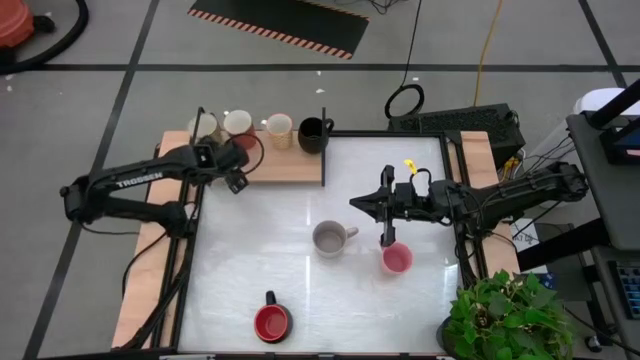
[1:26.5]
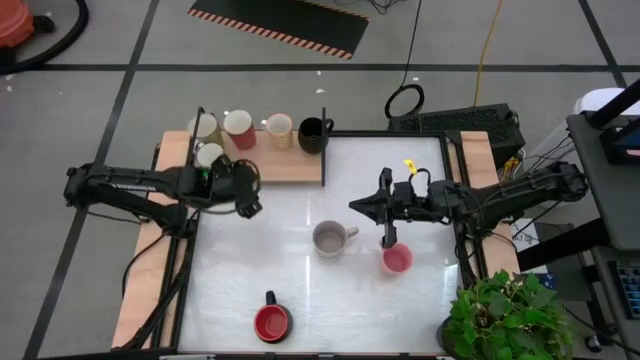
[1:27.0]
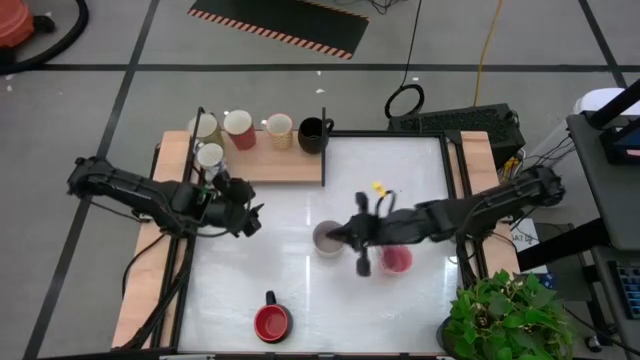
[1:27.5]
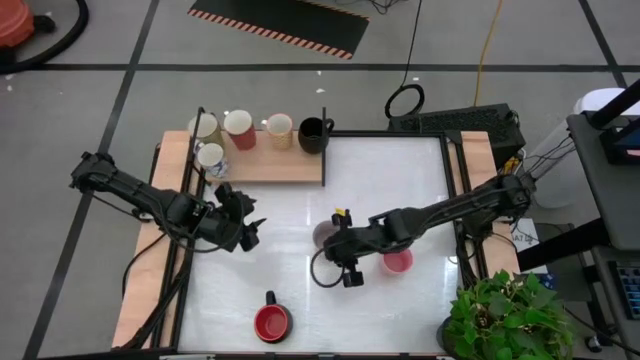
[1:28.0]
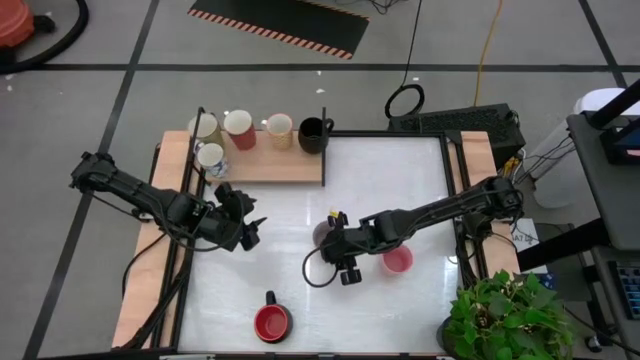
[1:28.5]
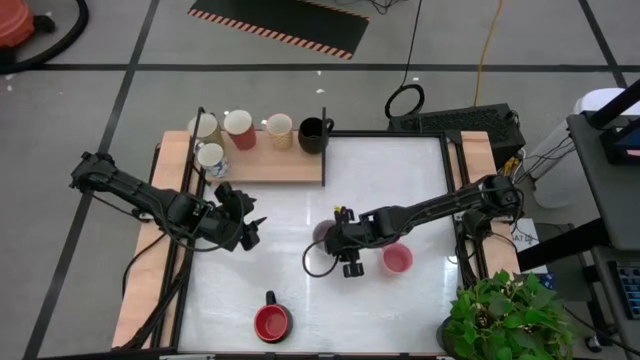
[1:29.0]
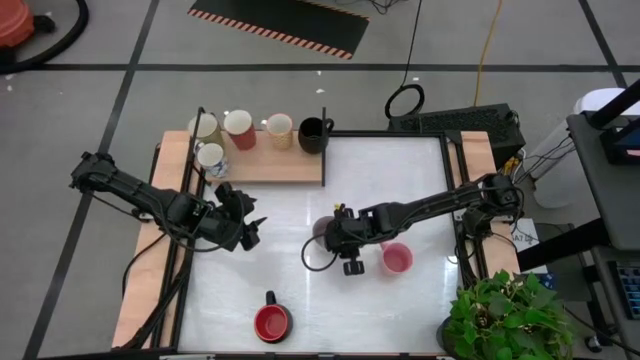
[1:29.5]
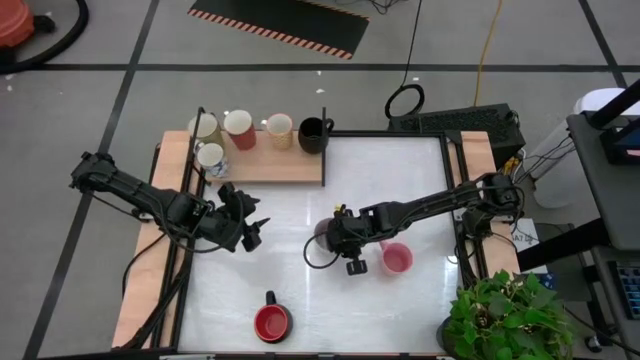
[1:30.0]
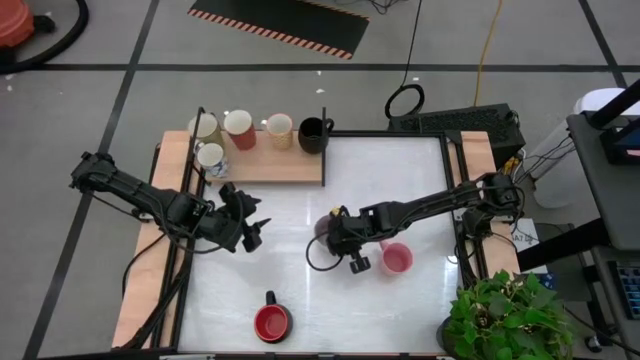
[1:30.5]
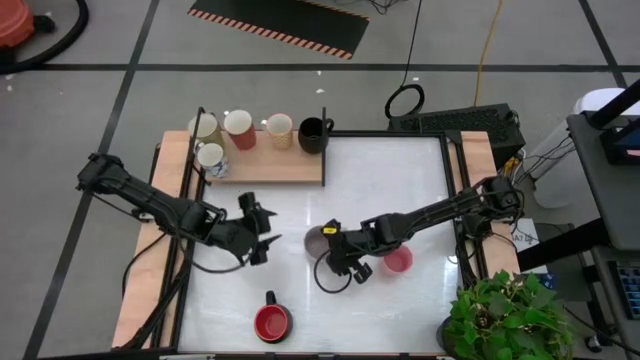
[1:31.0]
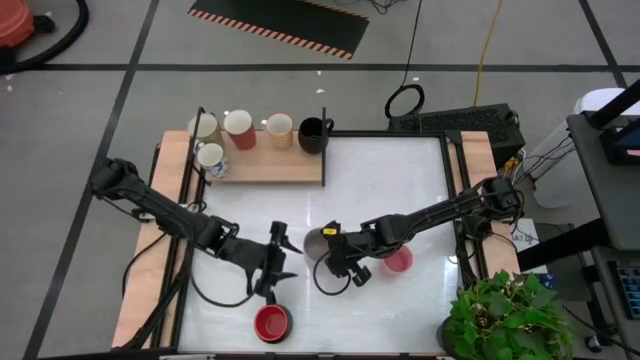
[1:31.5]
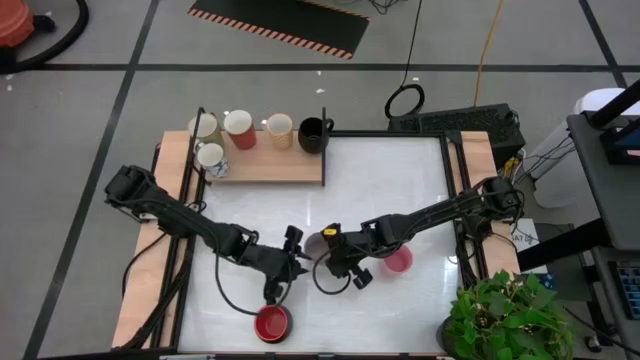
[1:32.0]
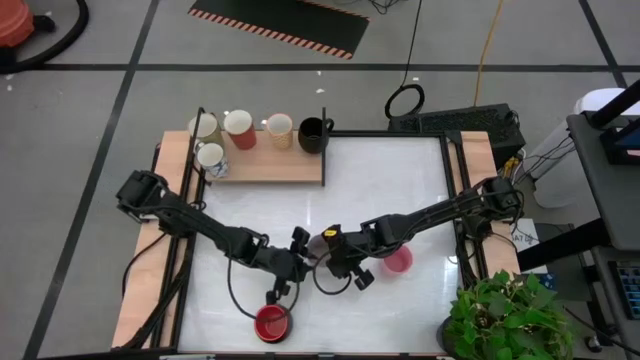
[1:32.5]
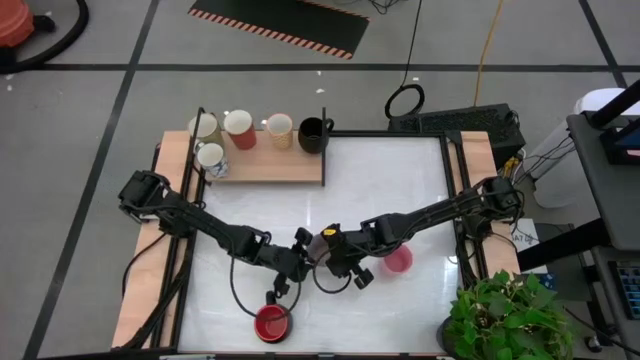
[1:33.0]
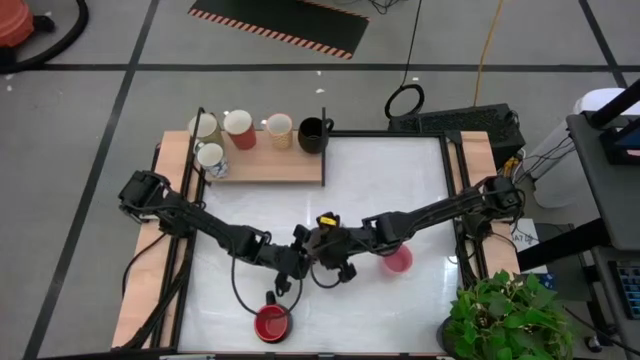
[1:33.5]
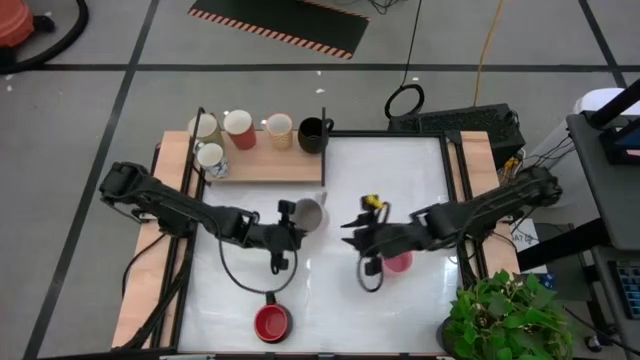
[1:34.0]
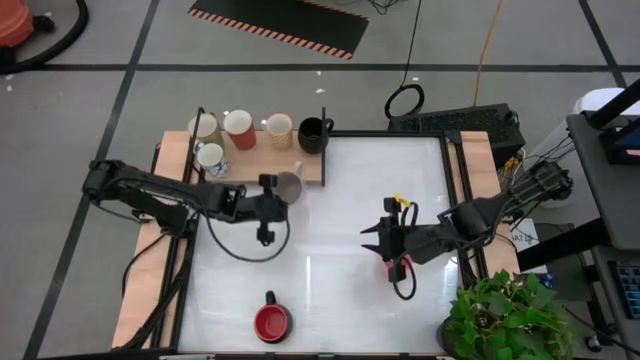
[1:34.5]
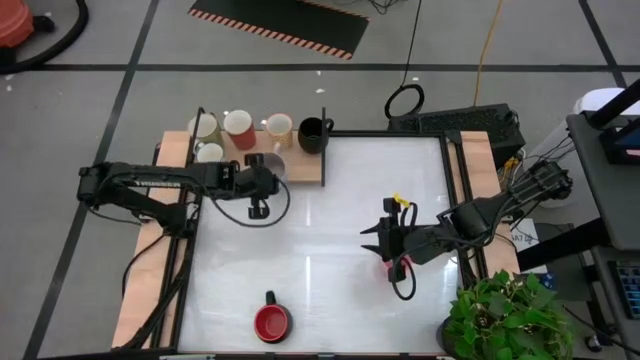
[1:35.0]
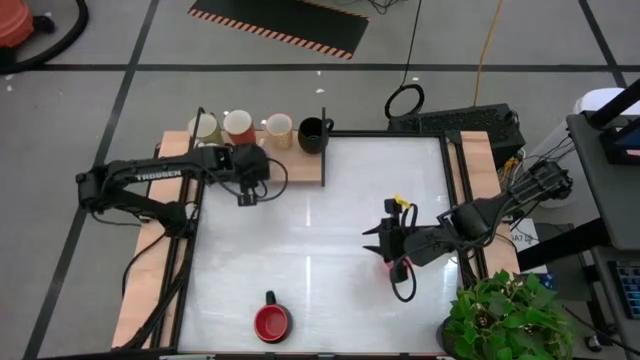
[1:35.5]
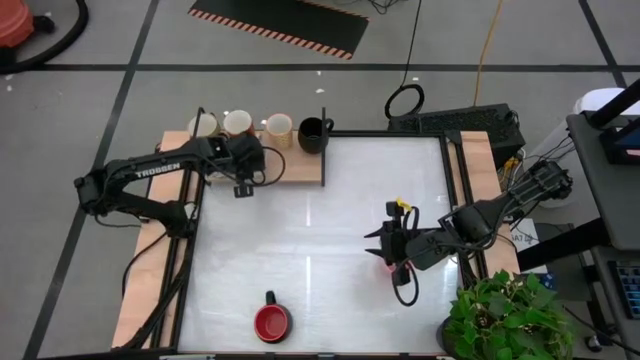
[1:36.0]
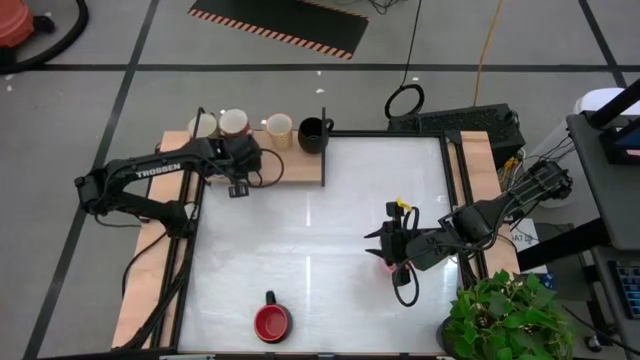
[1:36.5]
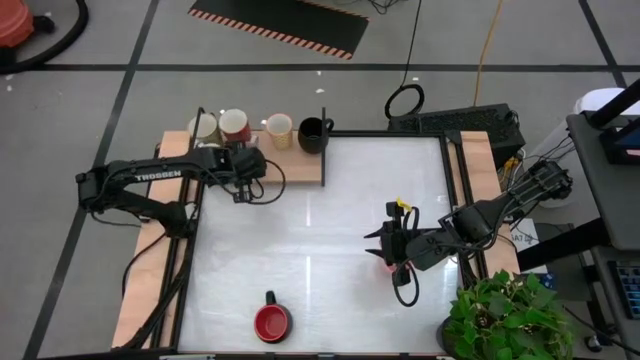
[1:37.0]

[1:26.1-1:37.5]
Task: Place coffee mugs
Put the gray patterned mug on the shelf

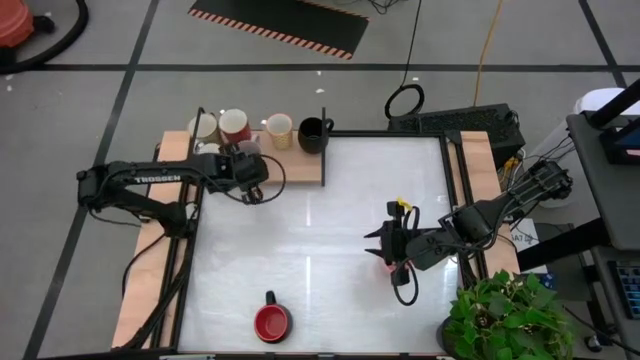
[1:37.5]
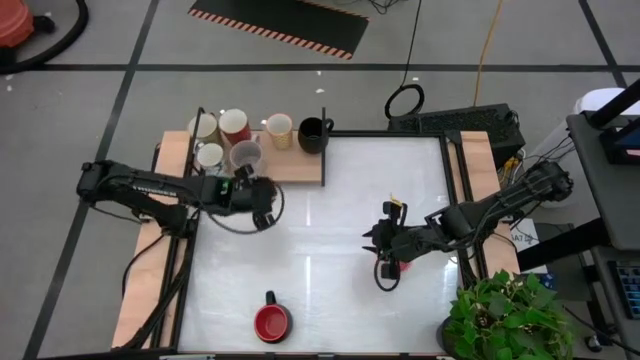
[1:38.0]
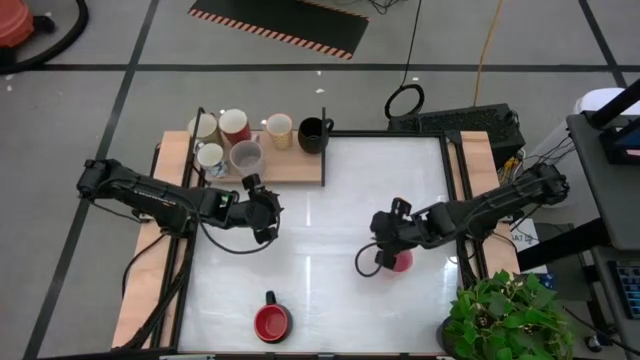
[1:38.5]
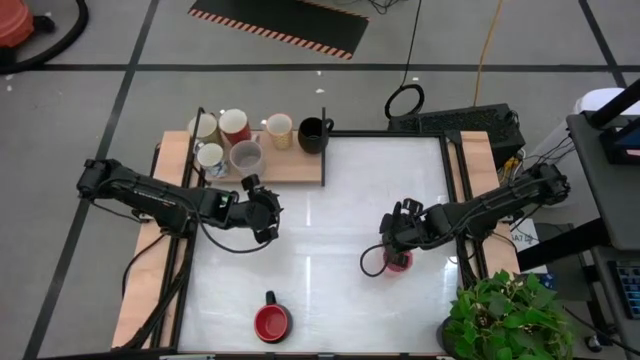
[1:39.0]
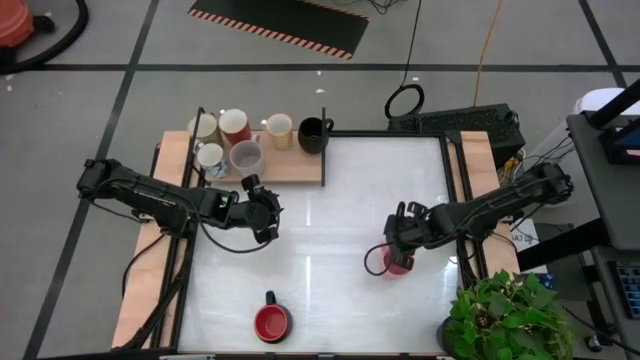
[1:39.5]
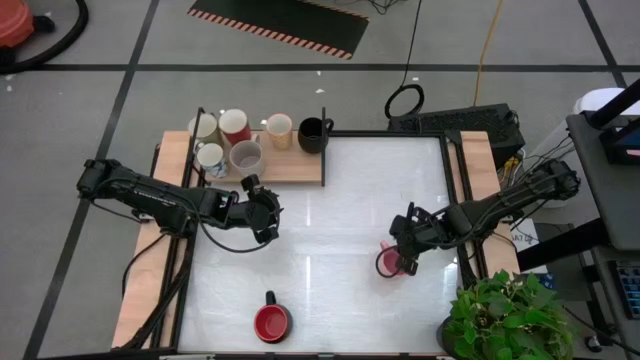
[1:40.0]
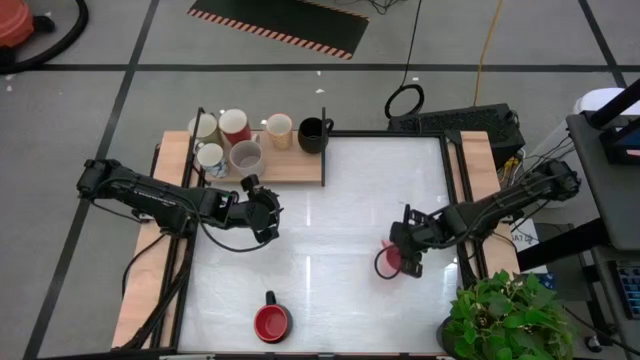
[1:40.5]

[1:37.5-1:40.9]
Put the pink mug on the shelf

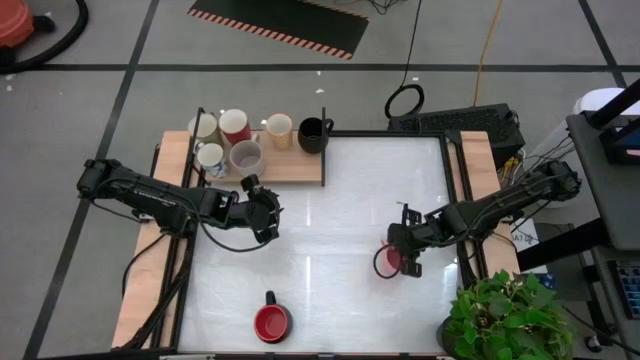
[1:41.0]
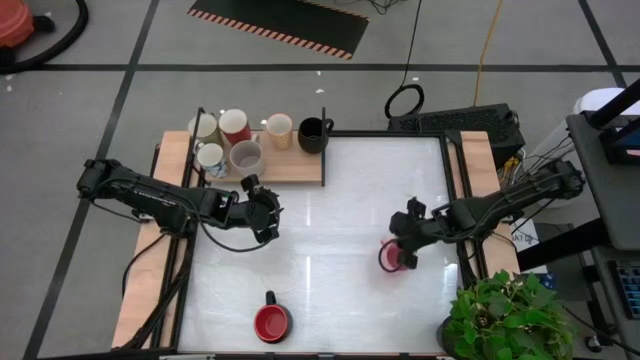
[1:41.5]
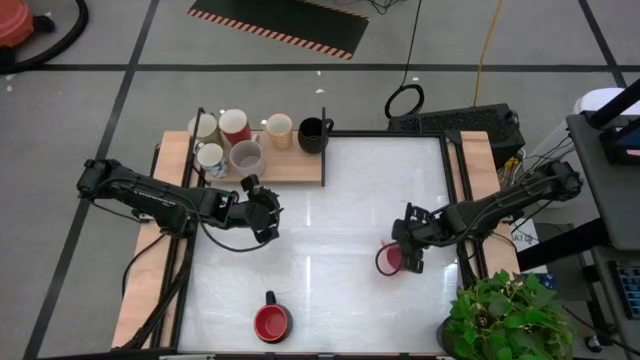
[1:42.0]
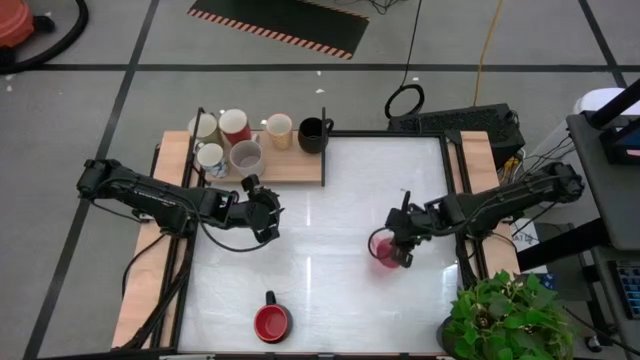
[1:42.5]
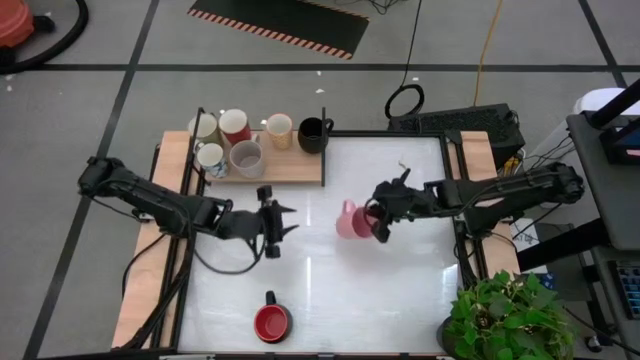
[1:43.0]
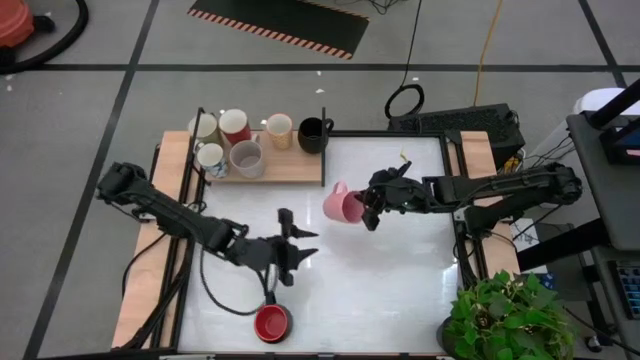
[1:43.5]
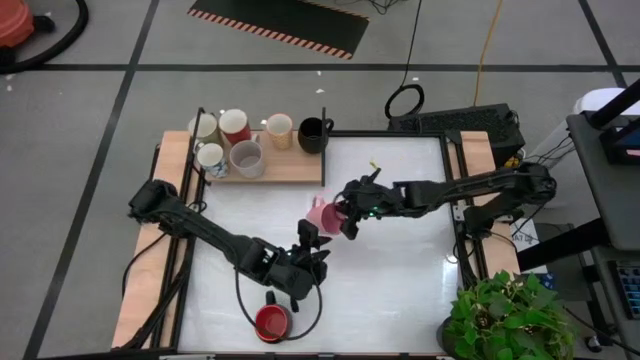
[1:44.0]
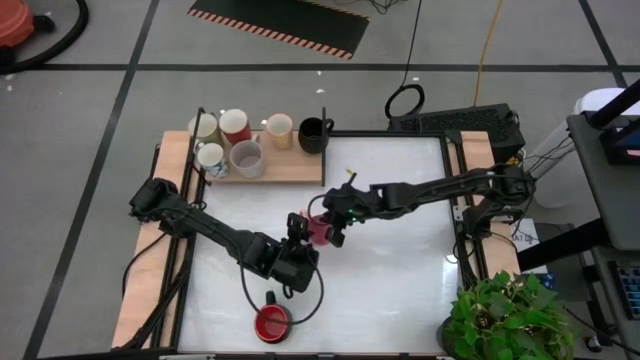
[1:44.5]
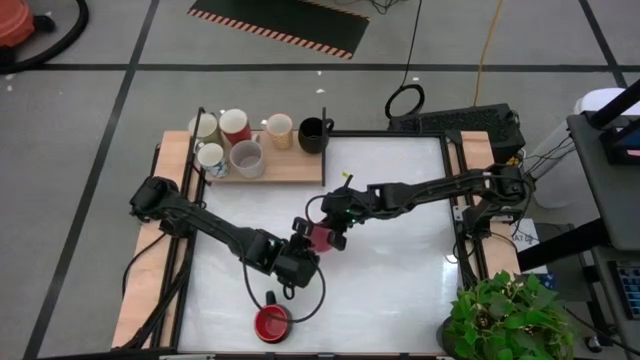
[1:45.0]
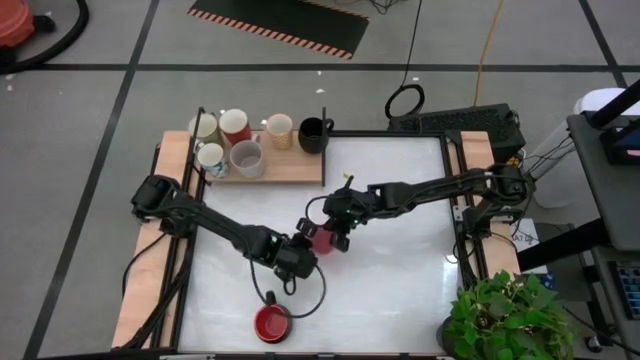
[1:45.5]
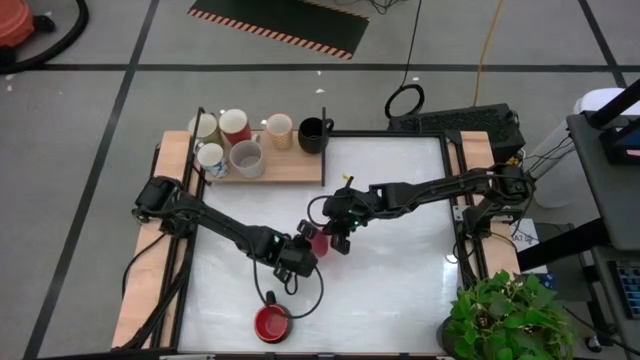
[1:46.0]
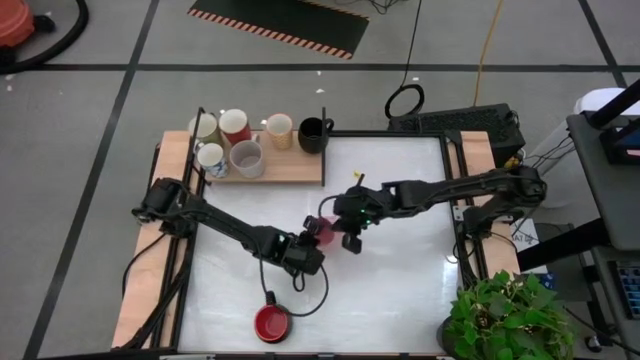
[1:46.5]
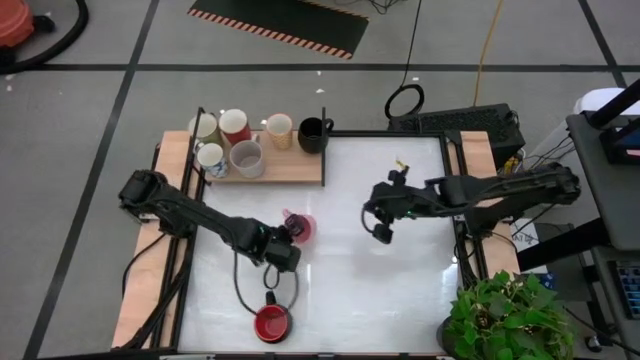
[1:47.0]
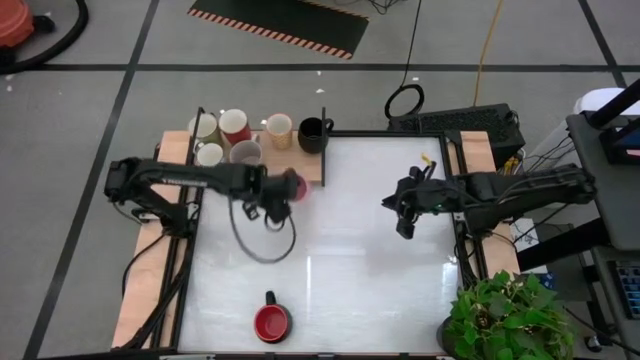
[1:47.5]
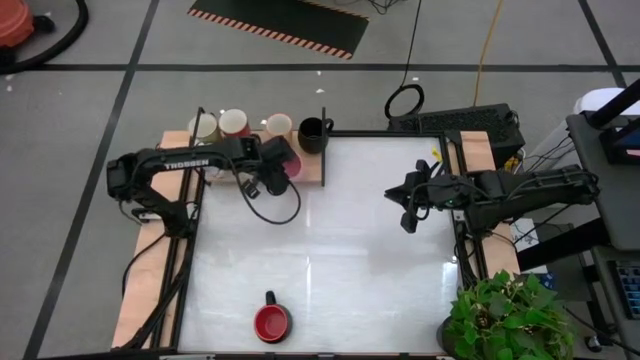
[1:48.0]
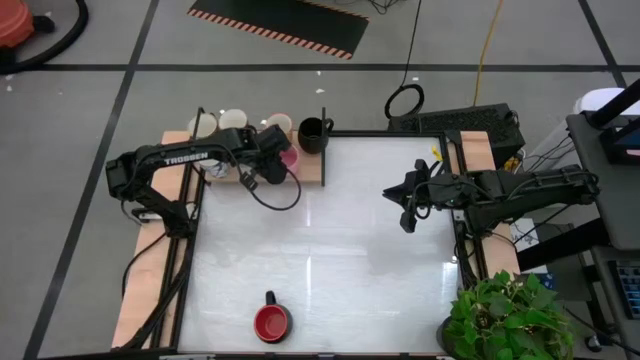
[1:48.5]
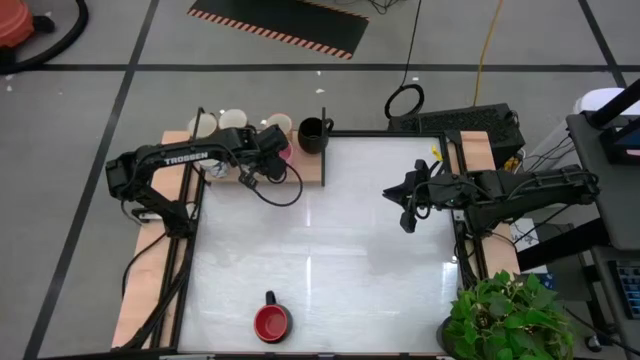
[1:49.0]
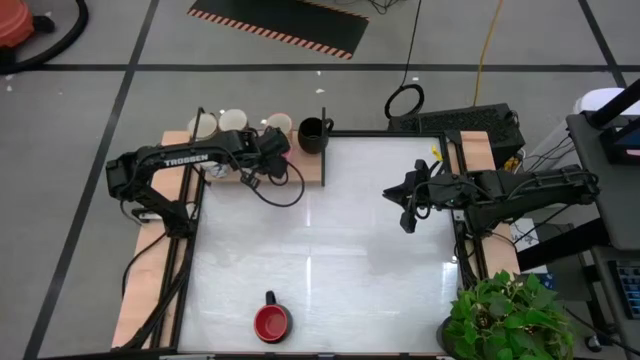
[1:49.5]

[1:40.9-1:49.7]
Put the pink mug on the shelf
